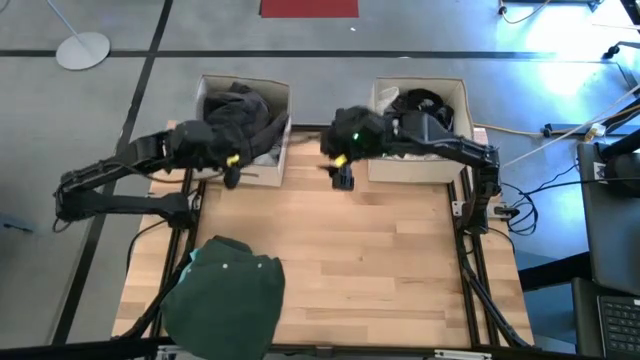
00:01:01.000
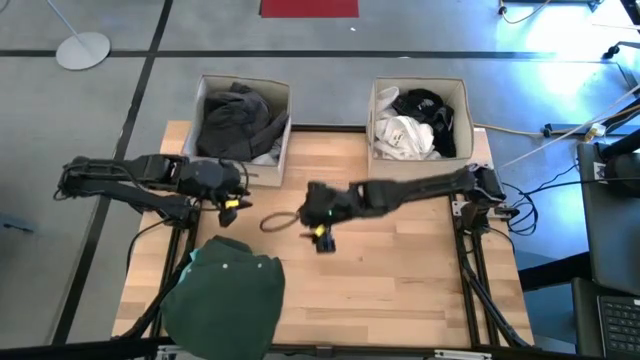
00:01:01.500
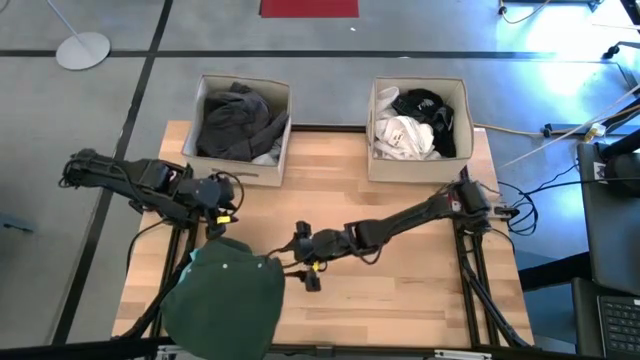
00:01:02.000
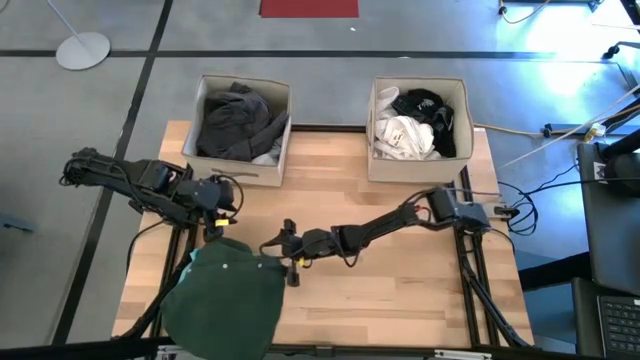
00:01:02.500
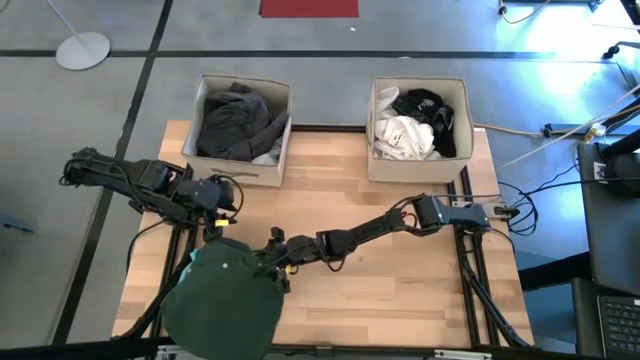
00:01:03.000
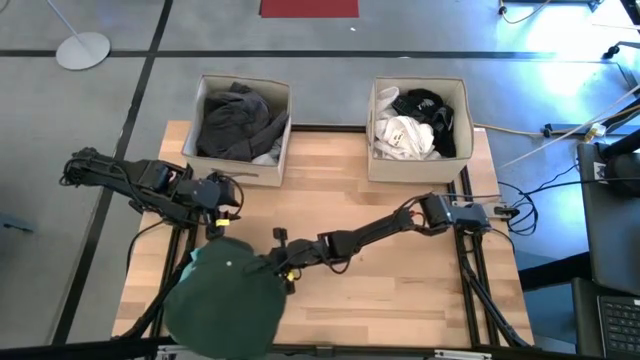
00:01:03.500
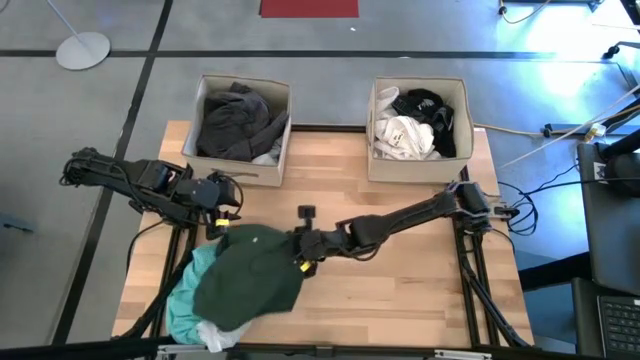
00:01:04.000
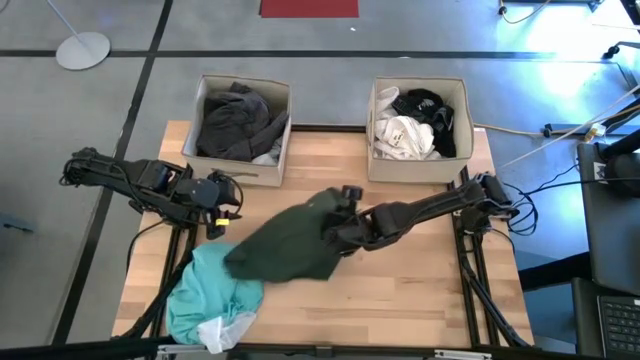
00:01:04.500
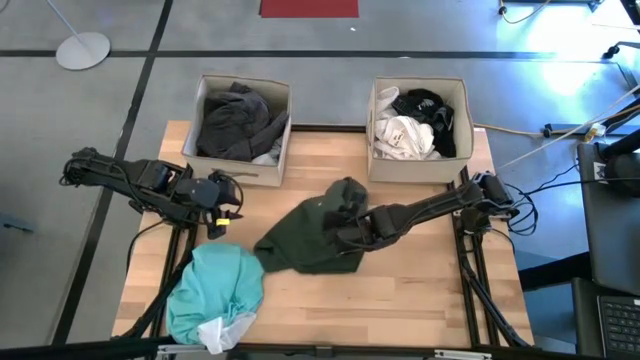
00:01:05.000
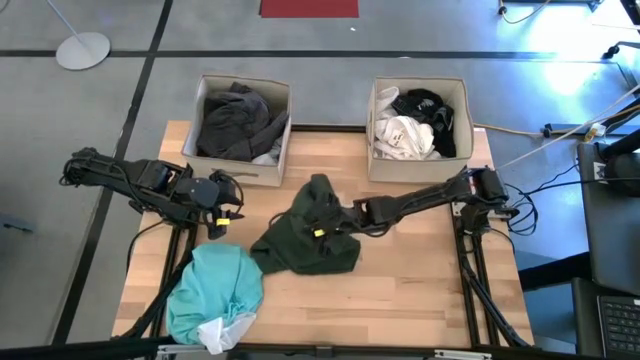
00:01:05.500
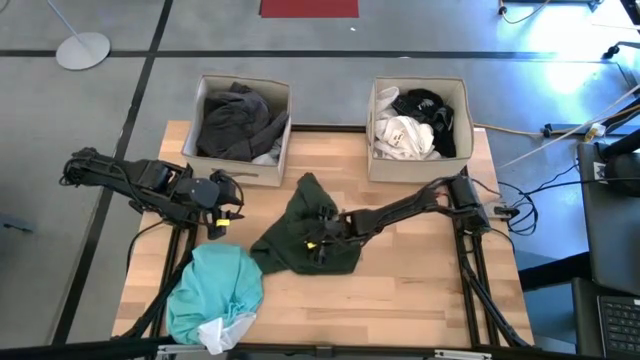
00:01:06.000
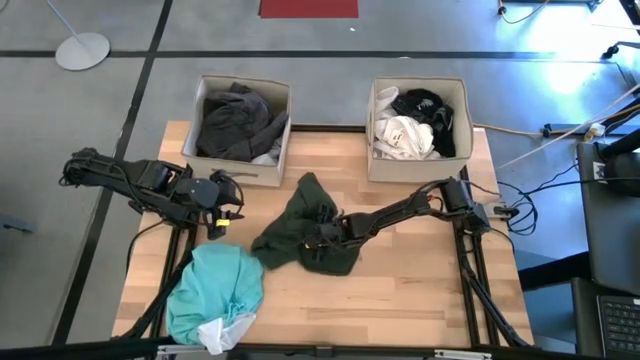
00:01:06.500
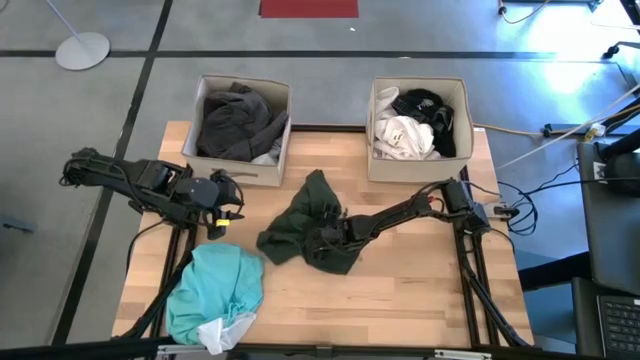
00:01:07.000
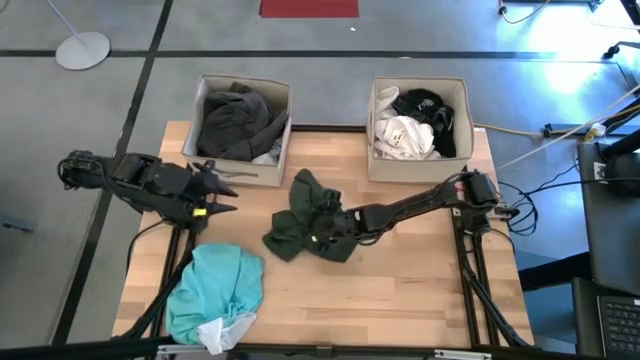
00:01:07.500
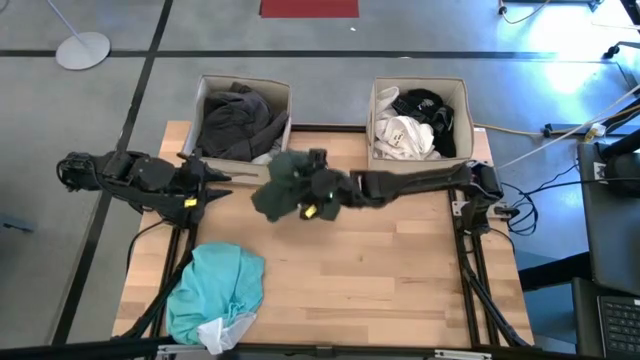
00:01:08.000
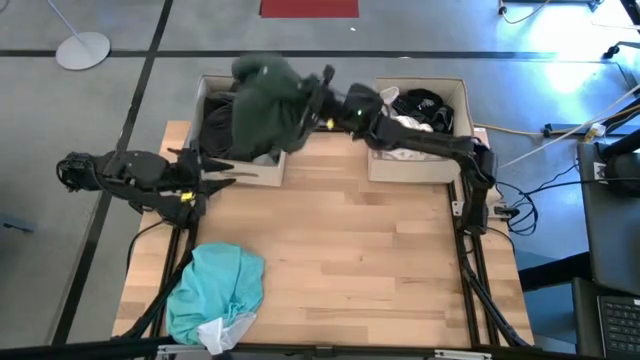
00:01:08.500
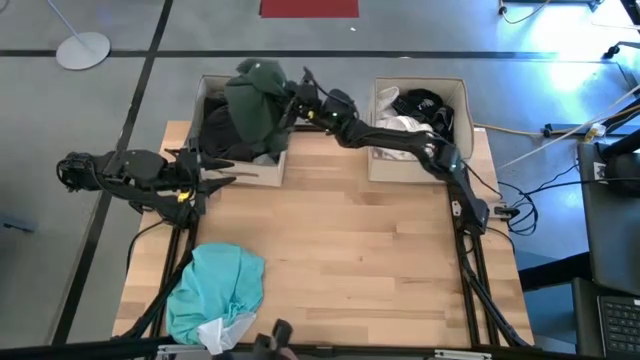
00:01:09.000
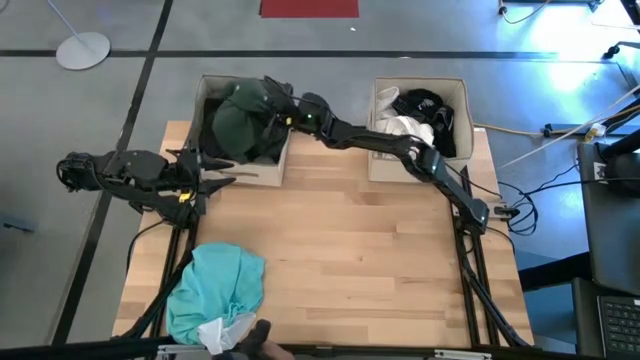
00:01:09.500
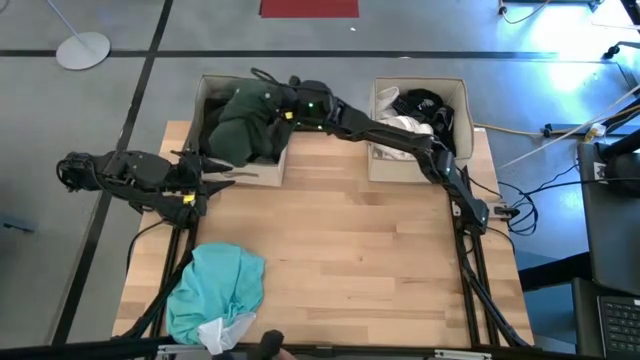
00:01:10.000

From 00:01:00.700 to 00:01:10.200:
Task: Sort clothes
Put the green polo shirt into the left laundry bin

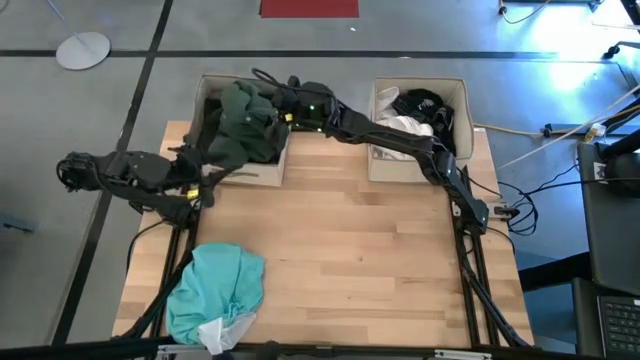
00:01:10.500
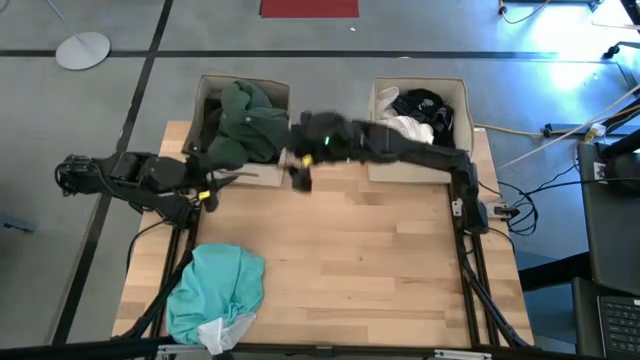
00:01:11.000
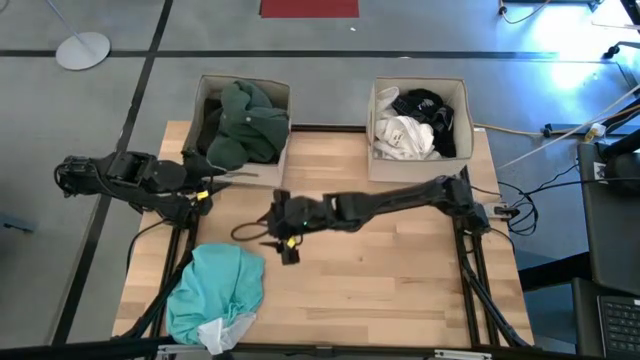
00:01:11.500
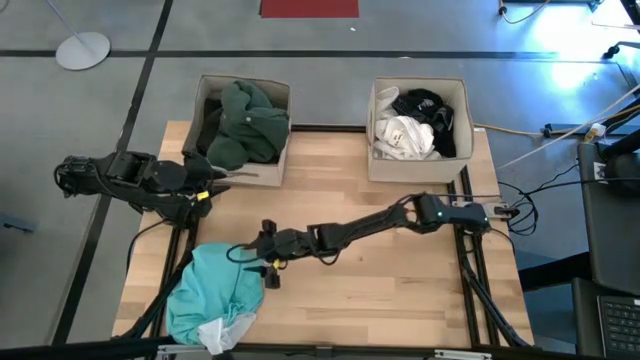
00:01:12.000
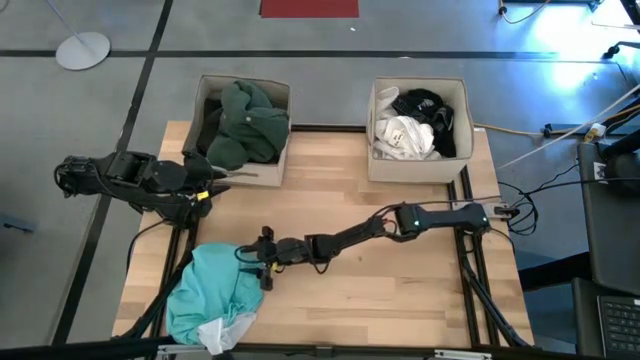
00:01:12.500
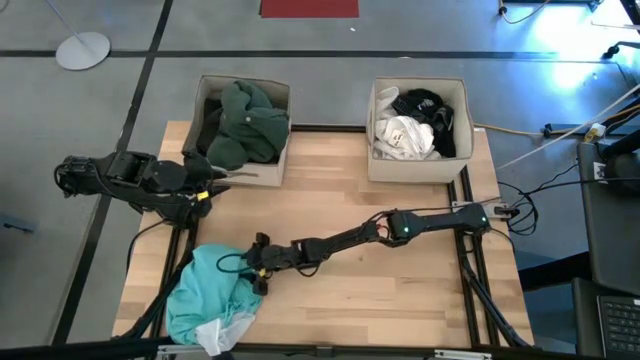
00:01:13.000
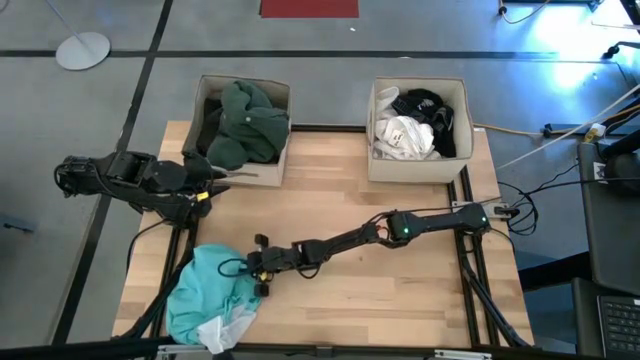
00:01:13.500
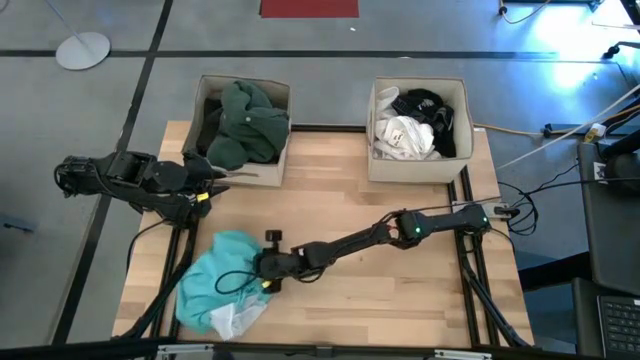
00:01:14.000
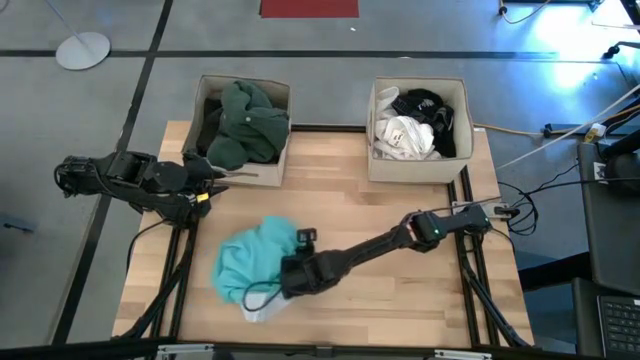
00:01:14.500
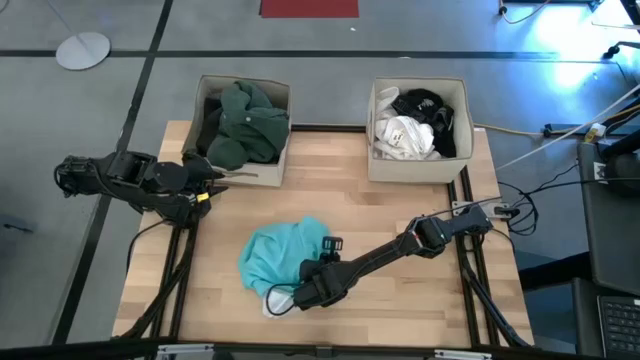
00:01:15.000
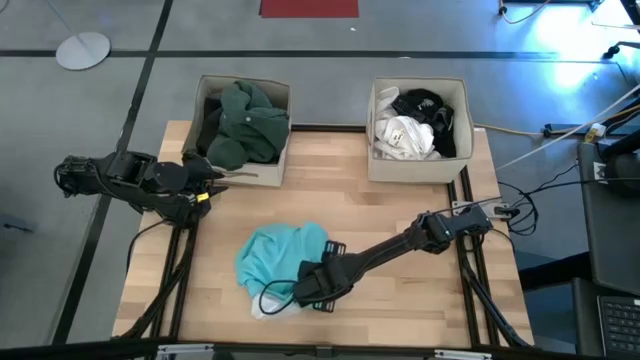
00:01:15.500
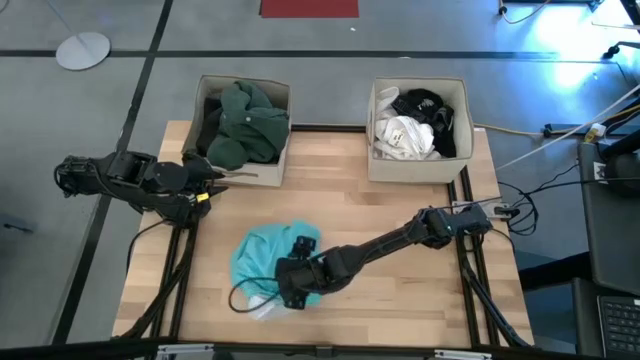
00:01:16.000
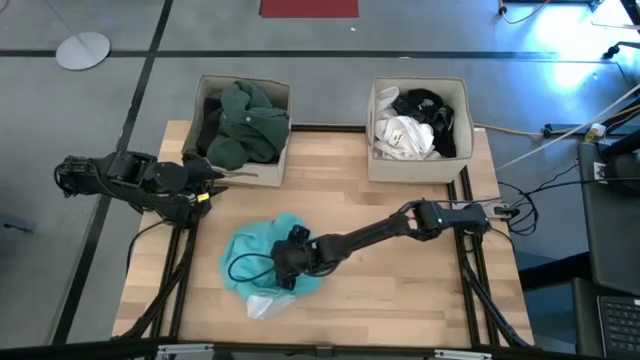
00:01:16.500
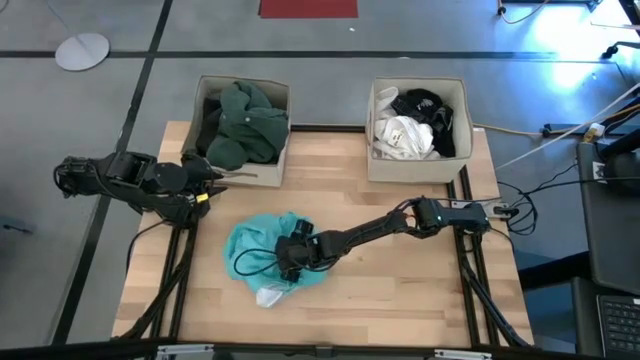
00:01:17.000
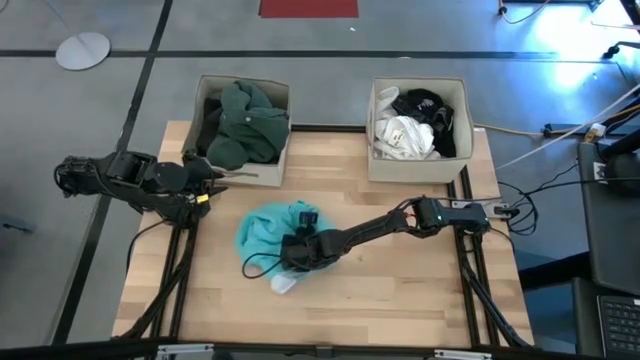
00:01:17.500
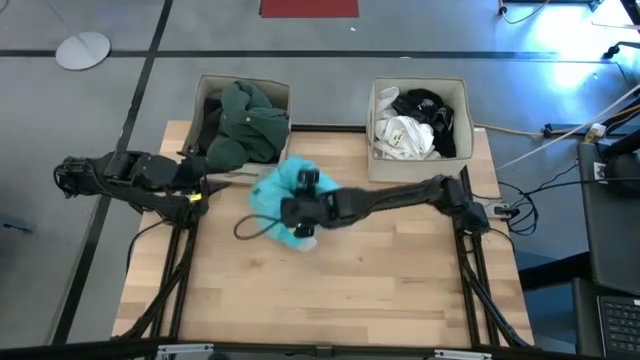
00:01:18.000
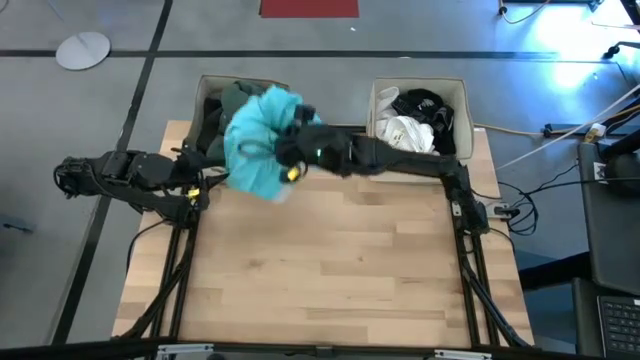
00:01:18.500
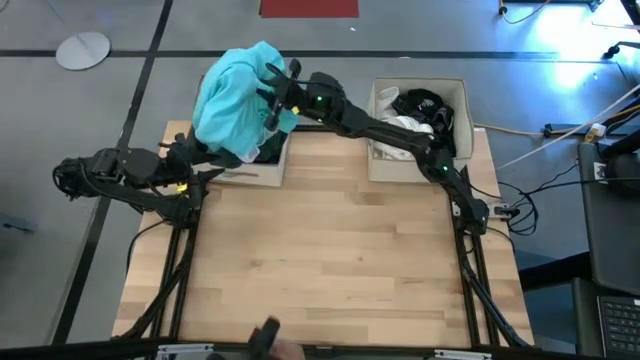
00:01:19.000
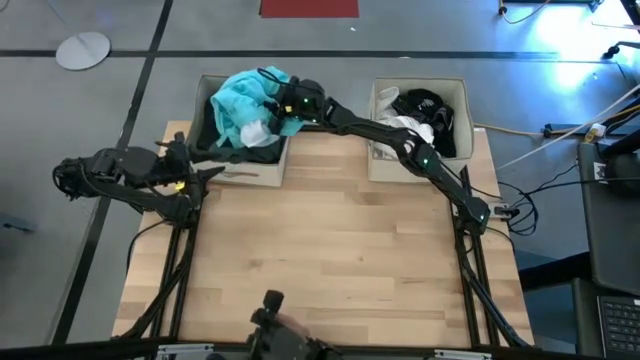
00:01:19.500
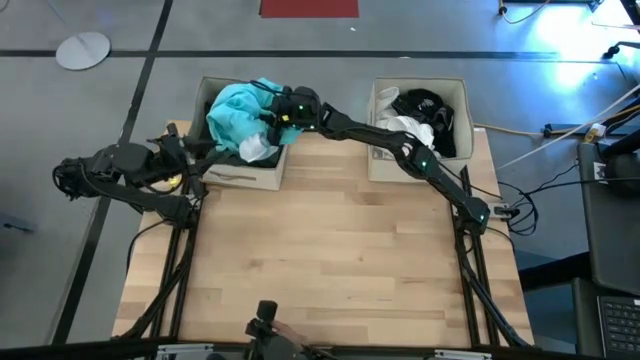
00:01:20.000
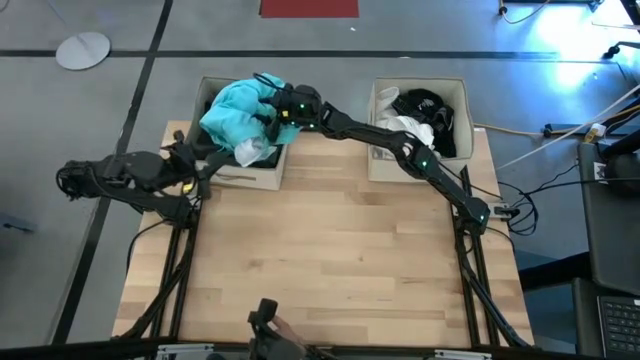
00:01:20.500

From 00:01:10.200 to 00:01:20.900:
Put the light blue shorts into the left laundry bin

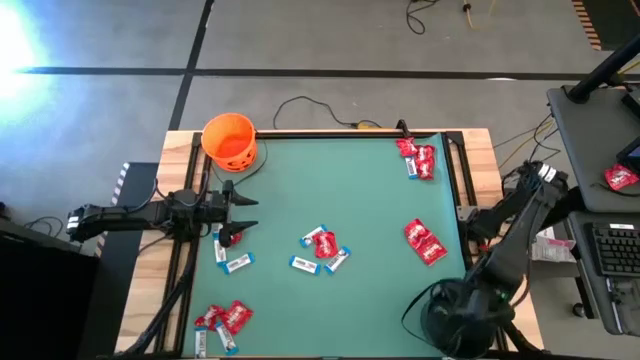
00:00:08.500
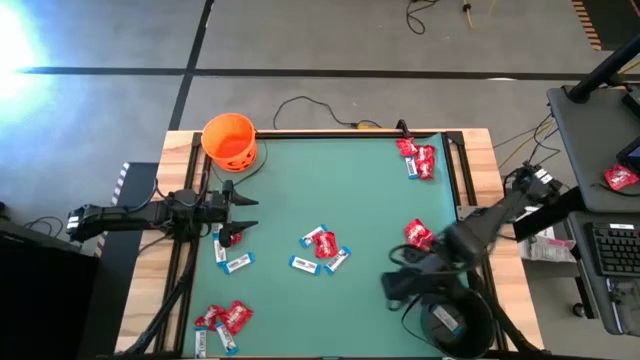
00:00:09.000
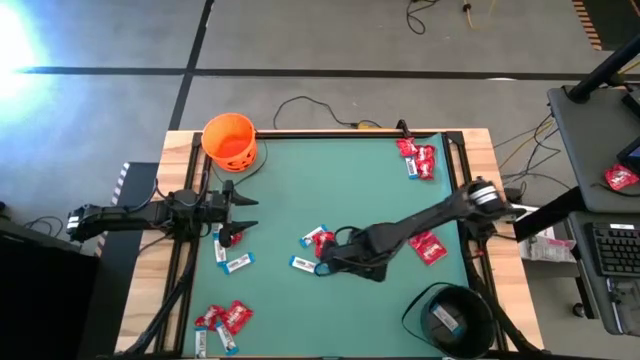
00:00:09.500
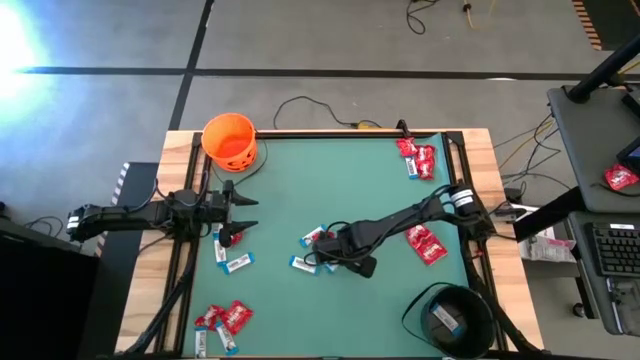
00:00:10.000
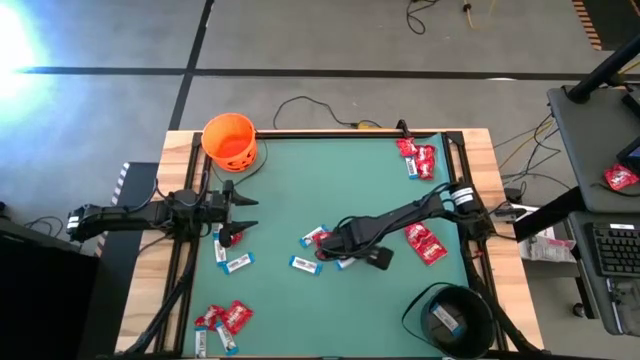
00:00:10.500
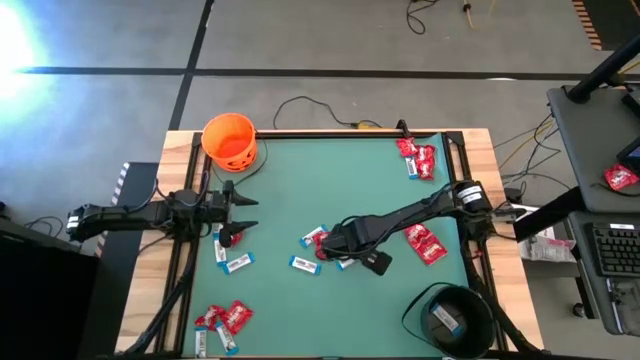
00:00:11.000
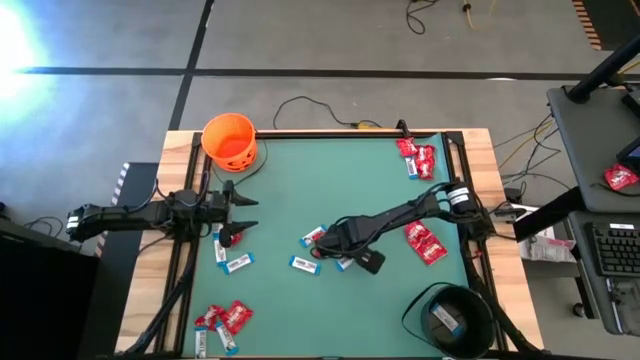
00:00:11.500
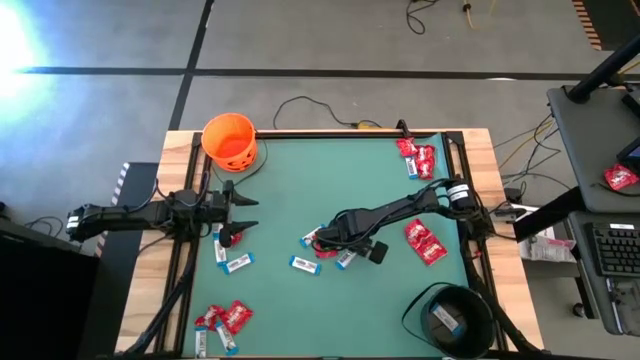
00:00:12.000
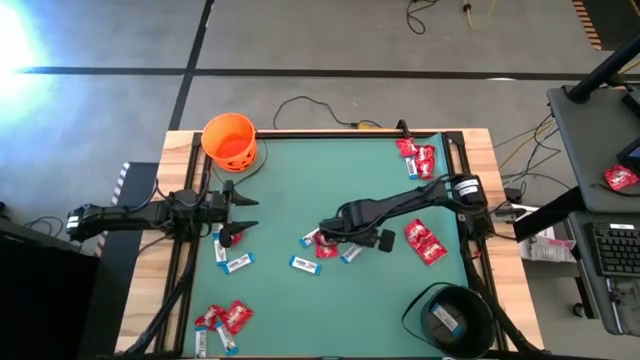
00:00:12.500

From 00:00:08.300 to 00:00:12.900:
Task: Sort candy by brand, put in halloween buckets
Put the white chocolate into the black bucket
